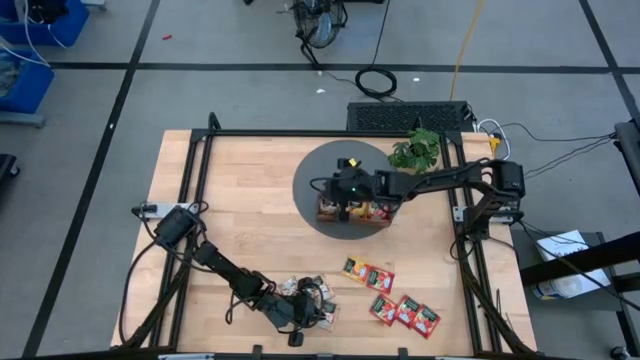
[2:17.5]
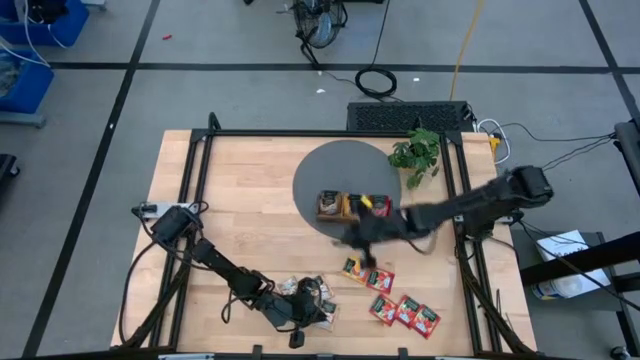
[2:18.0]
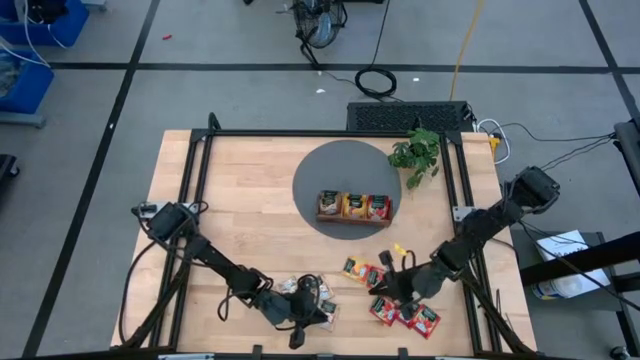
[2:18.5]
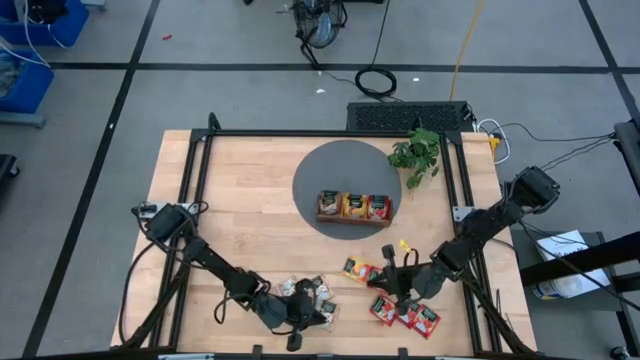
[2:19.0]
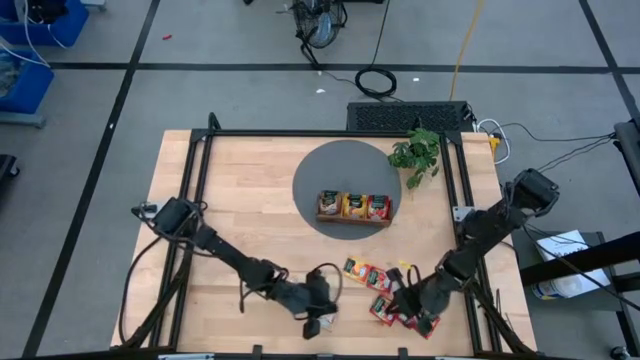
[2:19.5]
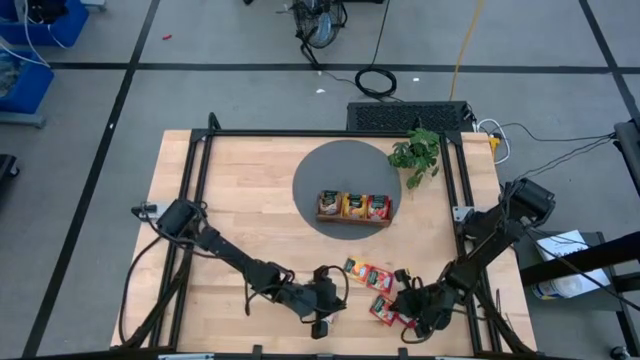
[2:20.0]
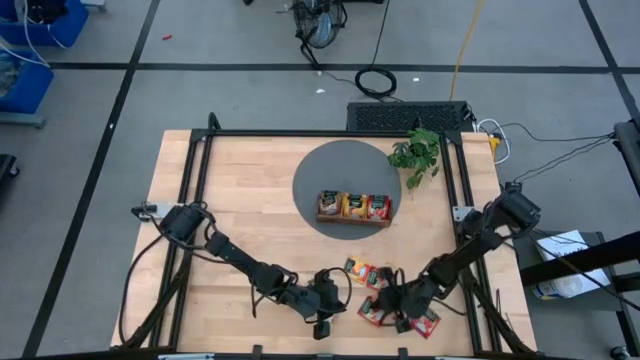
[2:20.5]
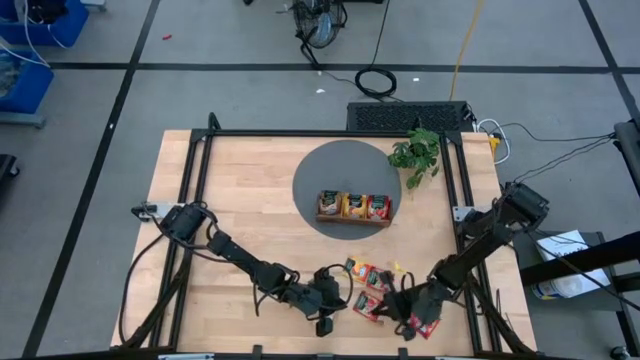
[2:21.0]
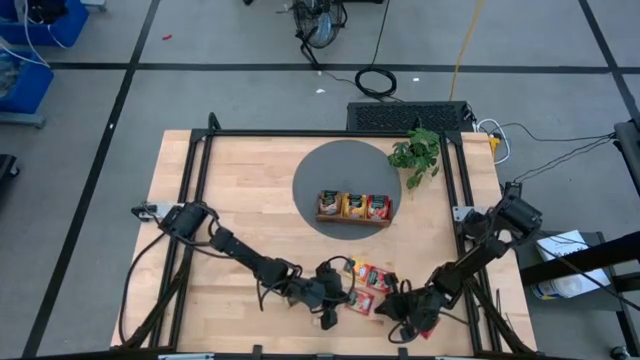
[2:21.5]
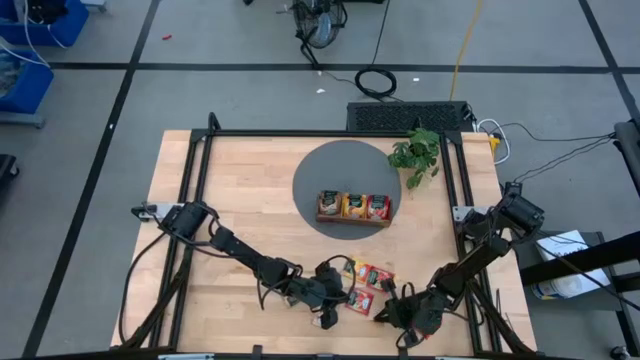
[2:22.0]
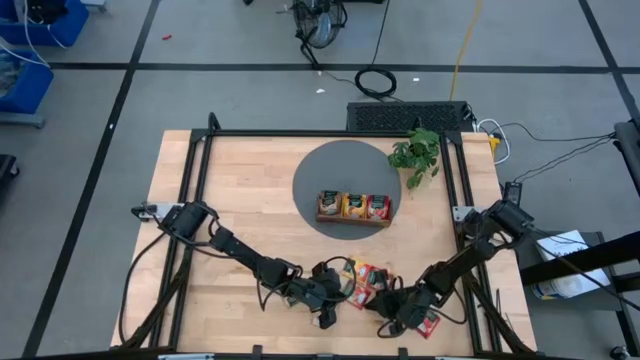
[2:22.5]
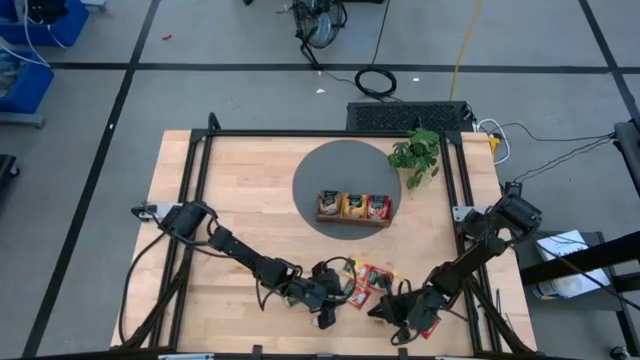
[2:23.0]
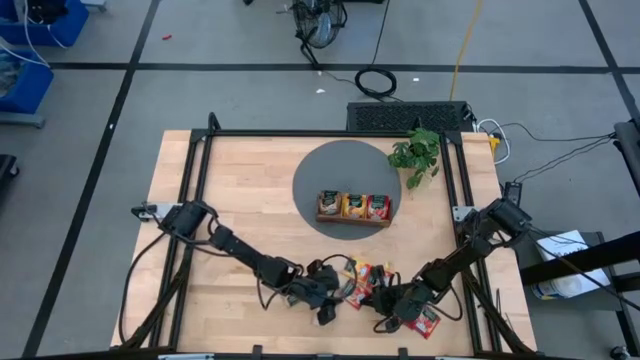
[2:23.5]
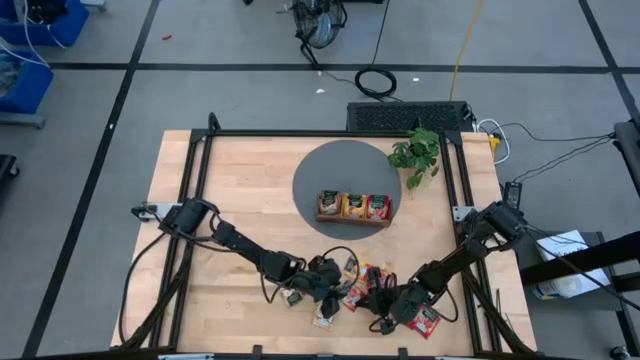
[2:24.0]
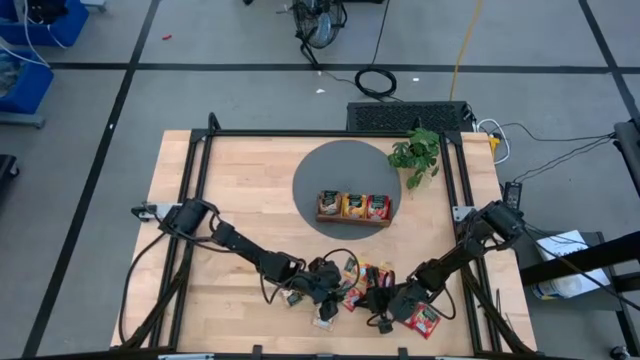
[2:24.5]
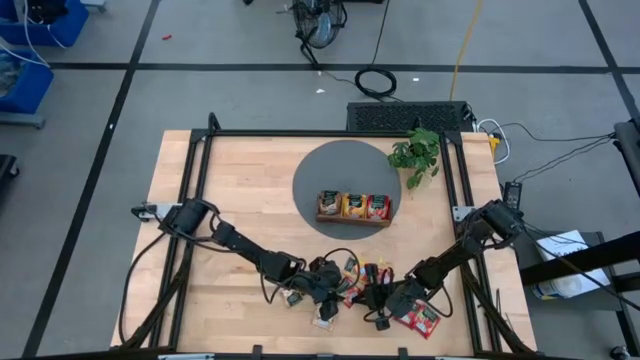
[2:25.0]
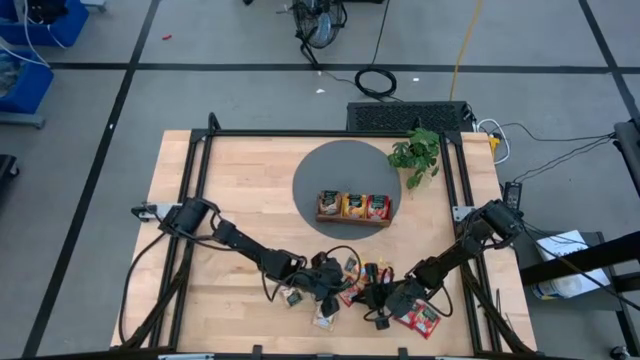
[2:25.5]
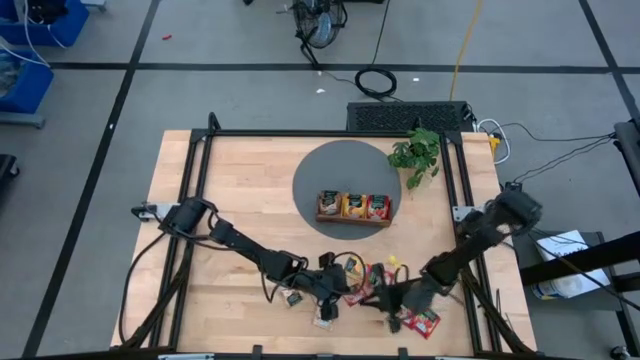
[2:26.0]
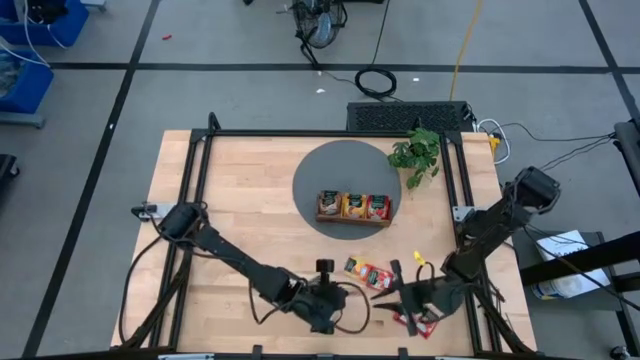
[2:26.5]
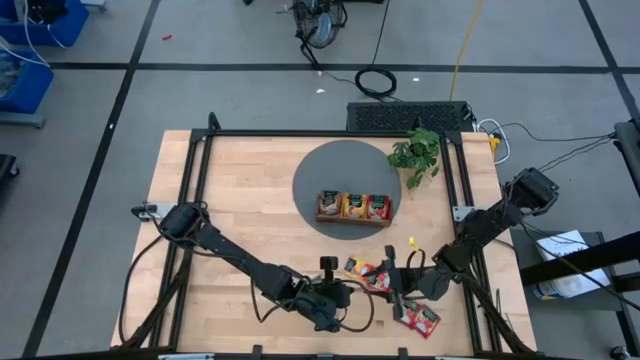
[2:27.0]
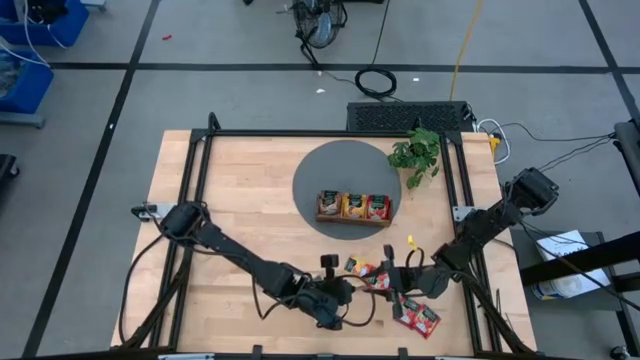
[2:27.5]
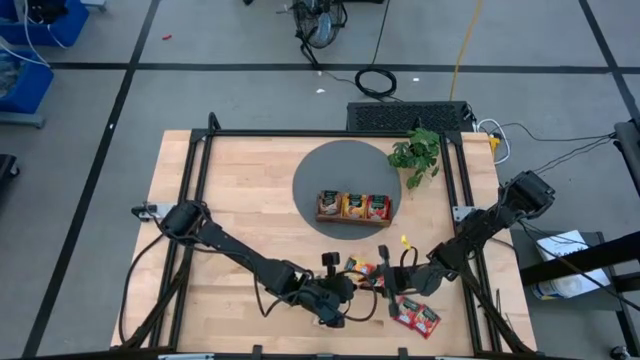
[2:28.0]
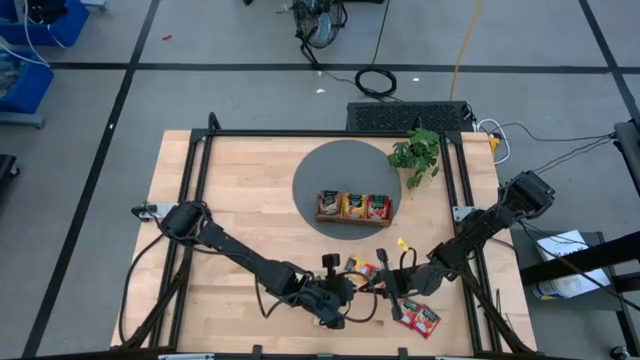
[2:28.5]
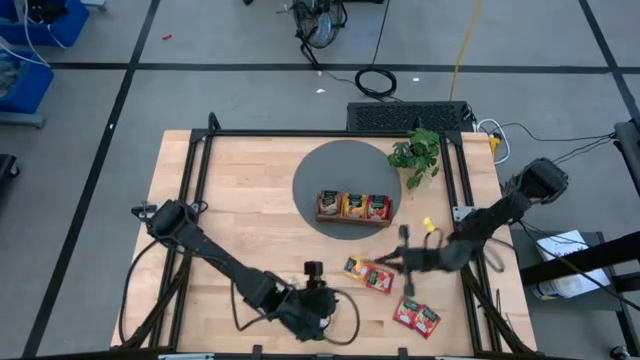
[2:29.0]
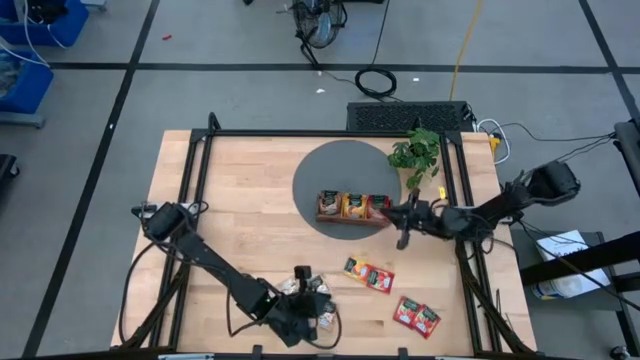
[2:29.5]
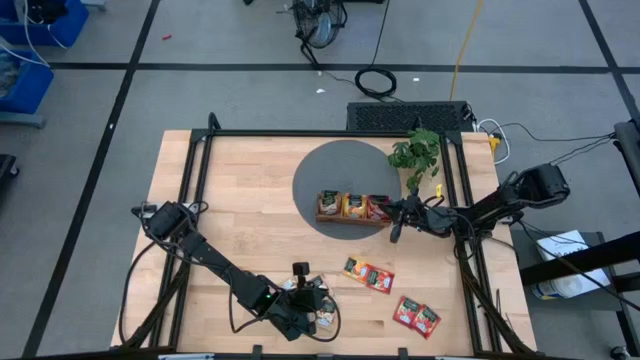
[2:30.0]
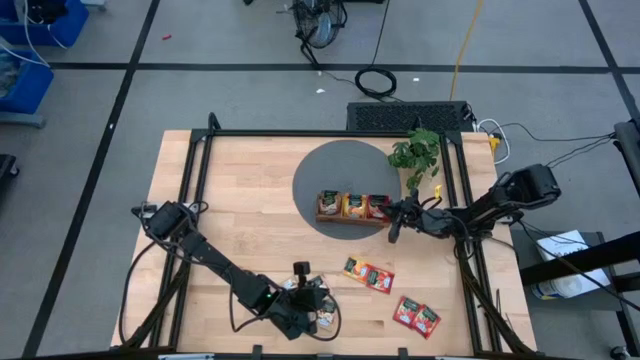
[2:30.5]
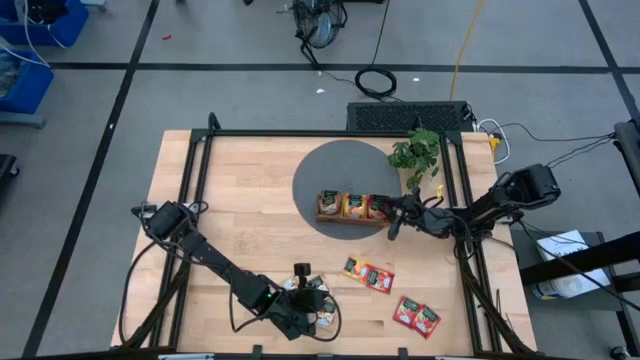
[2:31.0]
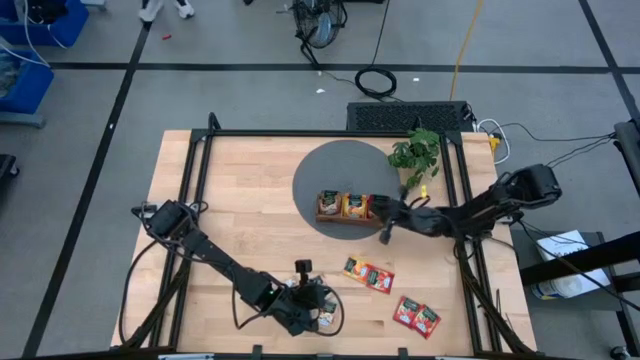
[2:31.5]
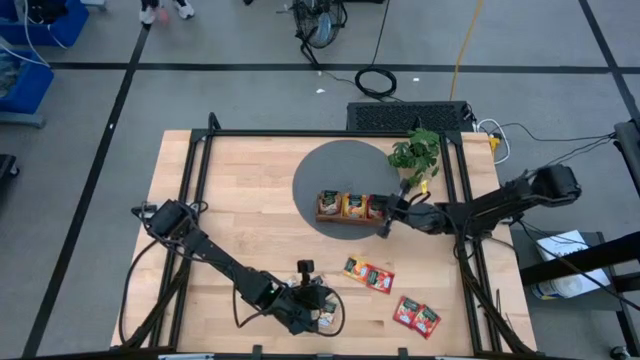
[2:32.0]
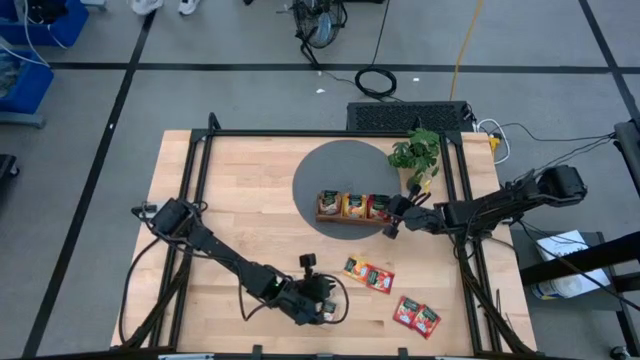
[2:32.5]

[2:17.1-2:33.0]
Task: Pick & Place Tea
Put the red tea bag into the right section of the wooden organiser

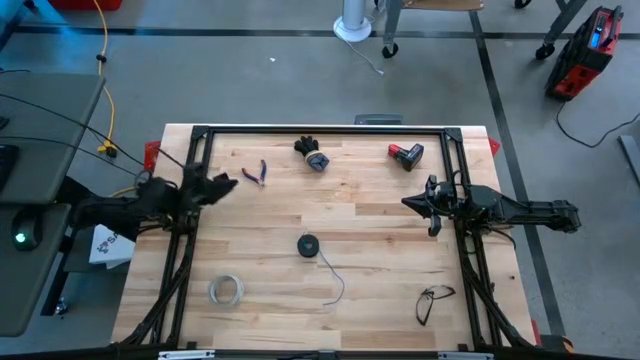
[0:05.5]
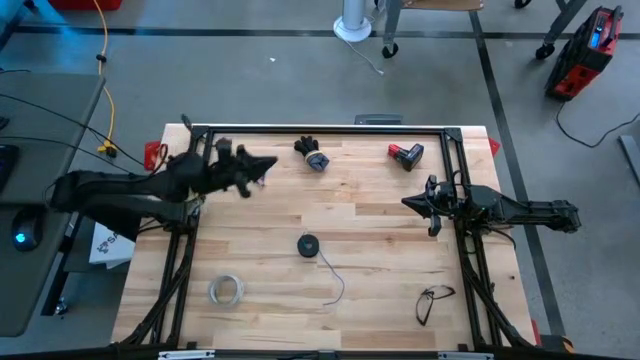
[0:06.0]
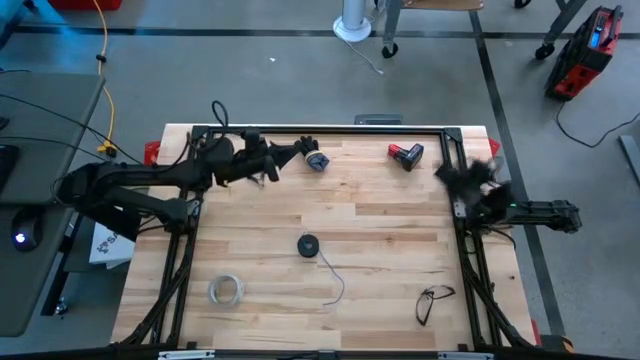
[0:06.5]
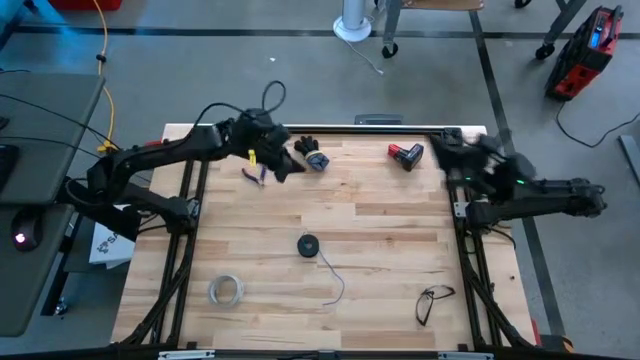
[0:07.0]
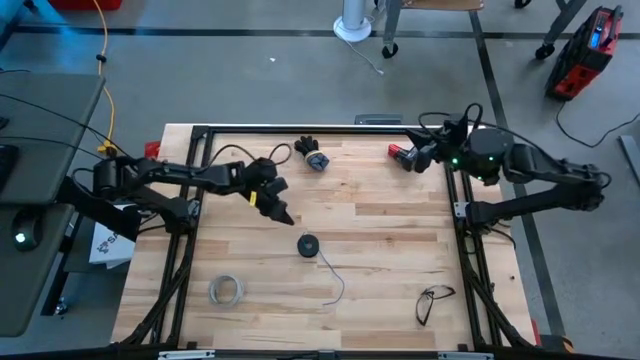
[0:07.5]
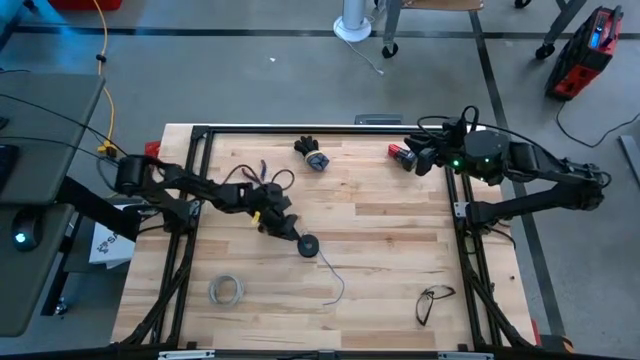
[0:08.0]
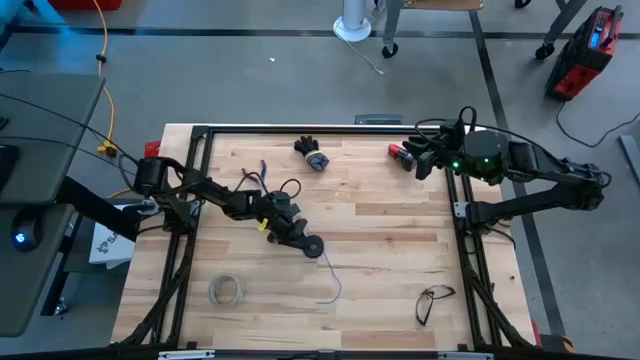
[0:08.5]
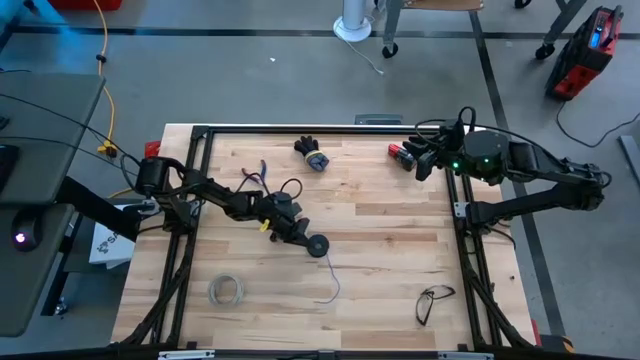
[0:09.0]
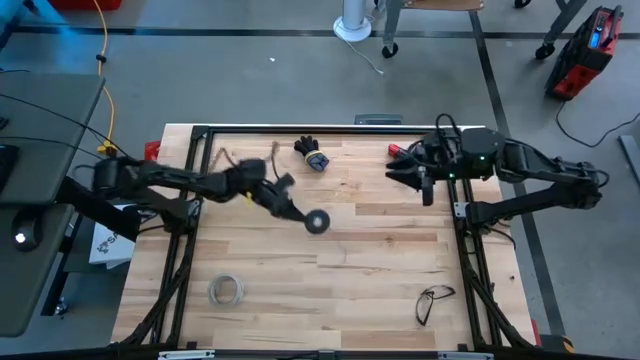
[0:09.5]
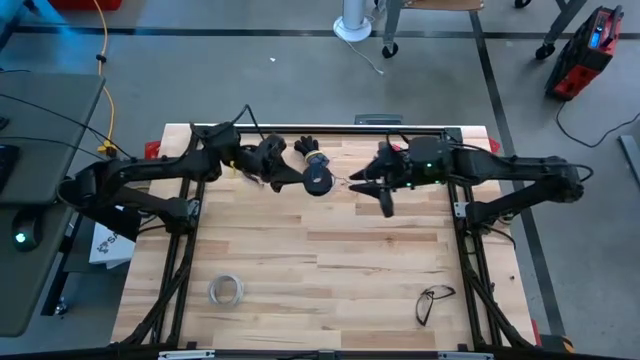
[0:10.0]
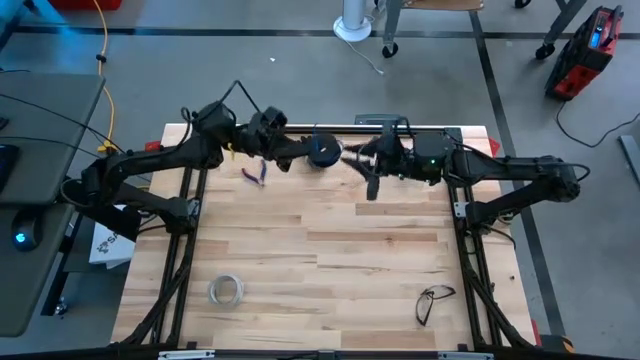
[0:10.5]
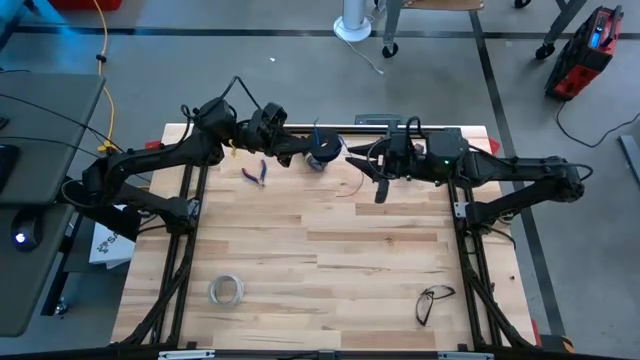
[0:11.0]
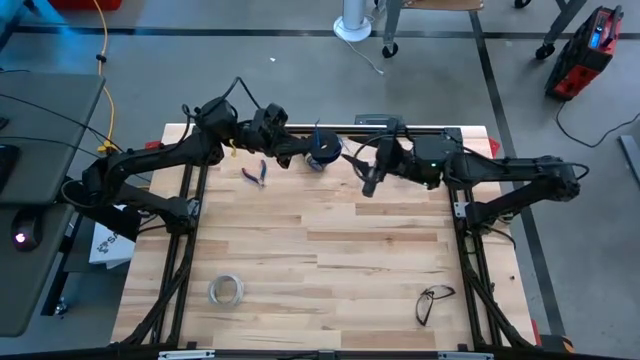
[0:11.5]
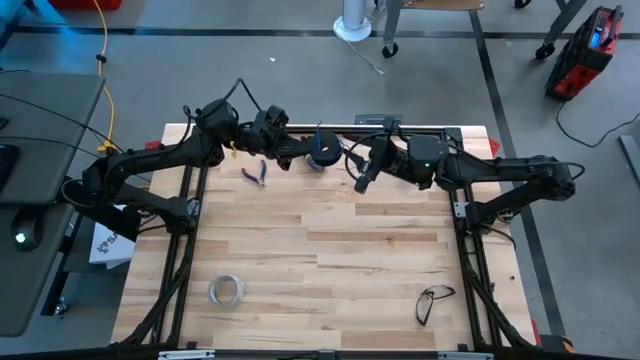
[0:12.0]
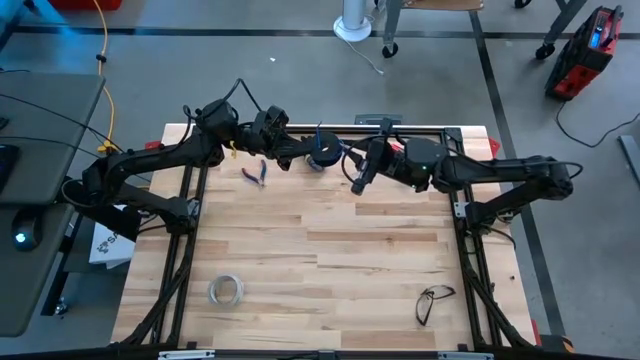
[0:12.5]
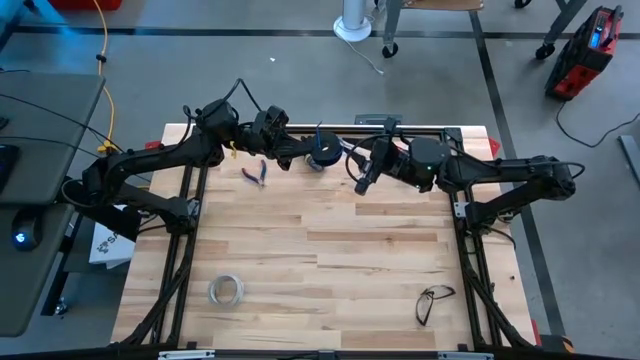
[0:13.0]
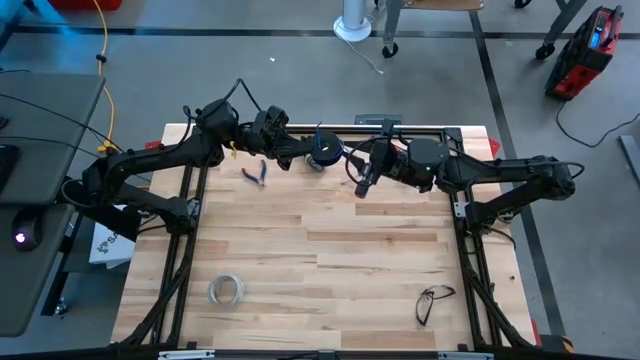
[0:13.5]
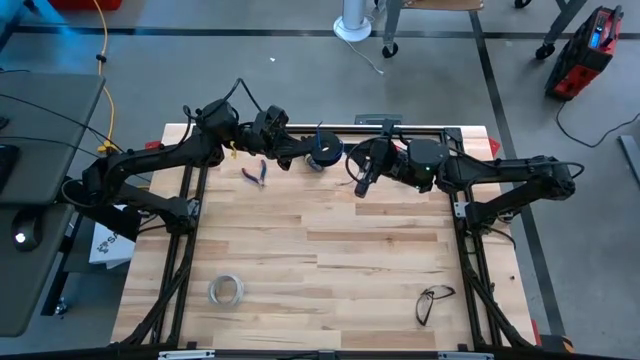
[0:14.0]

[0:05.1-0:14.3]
Task: Coil cords
Uncoil the blue wire from the black spool
